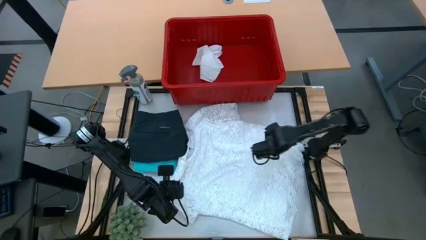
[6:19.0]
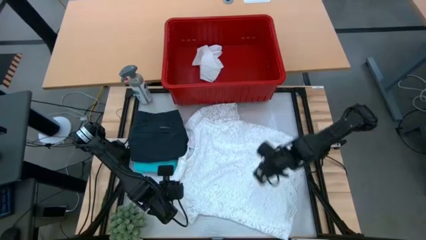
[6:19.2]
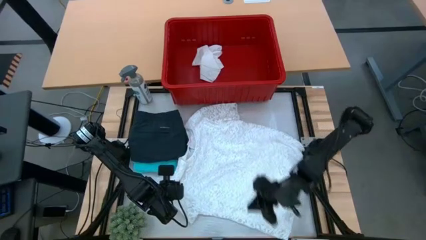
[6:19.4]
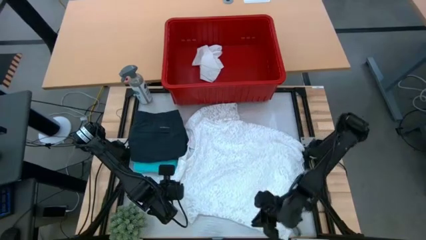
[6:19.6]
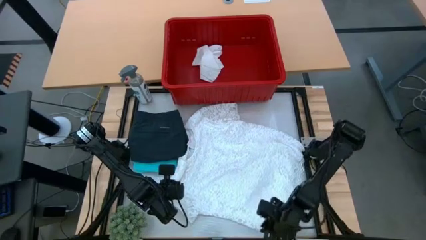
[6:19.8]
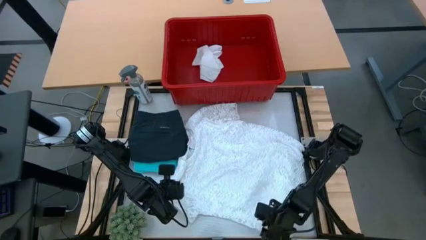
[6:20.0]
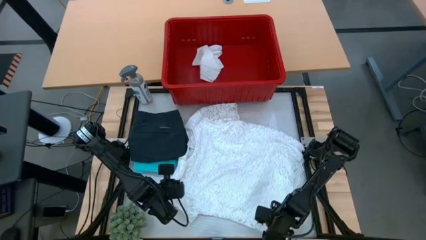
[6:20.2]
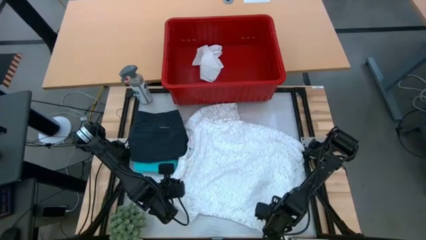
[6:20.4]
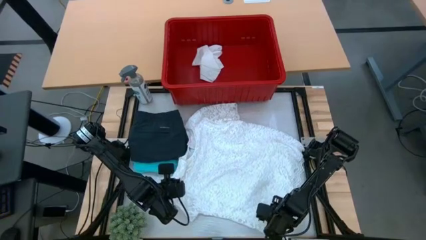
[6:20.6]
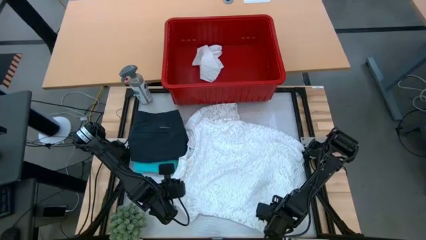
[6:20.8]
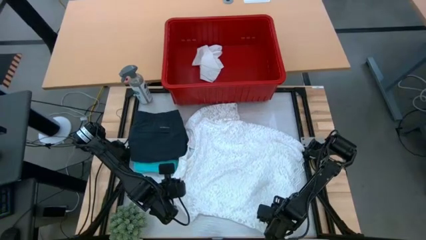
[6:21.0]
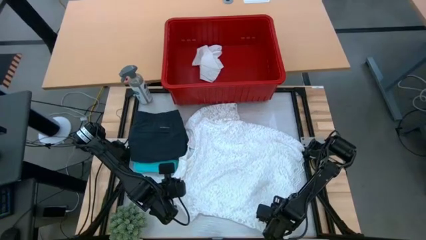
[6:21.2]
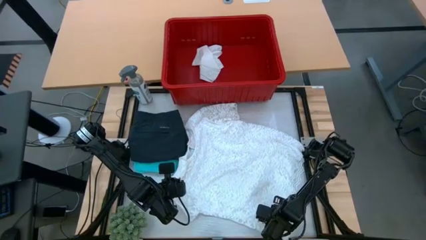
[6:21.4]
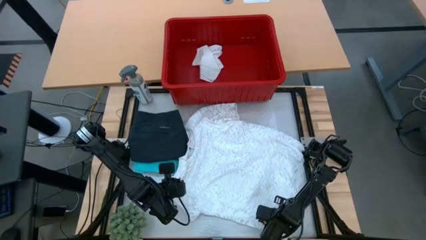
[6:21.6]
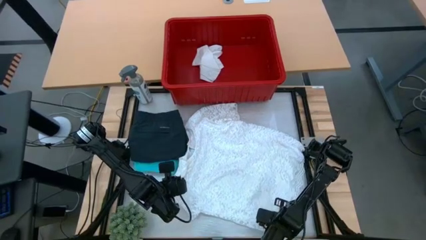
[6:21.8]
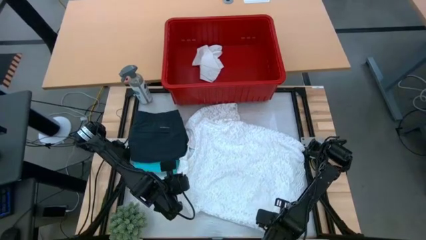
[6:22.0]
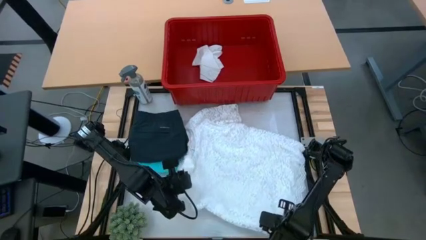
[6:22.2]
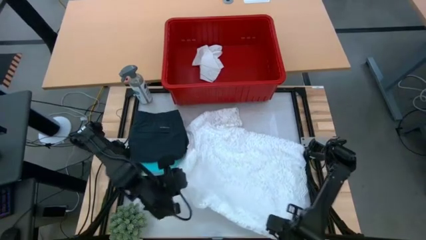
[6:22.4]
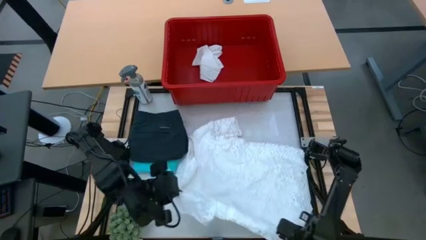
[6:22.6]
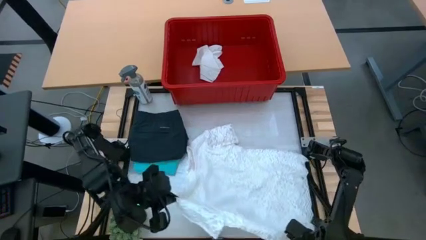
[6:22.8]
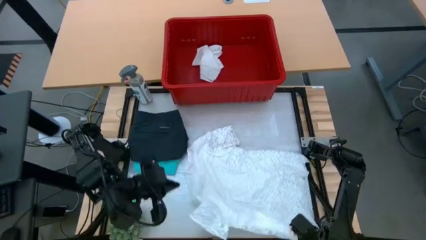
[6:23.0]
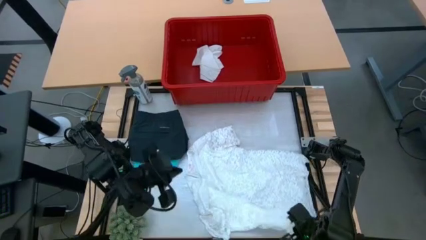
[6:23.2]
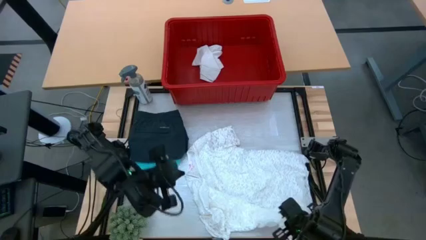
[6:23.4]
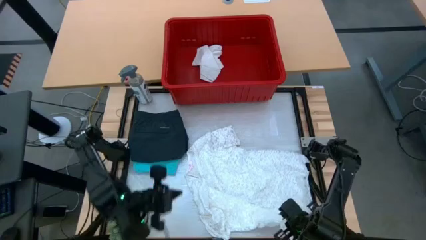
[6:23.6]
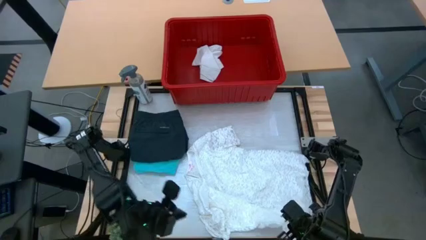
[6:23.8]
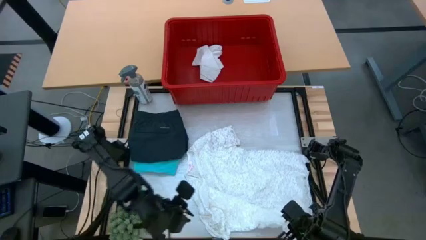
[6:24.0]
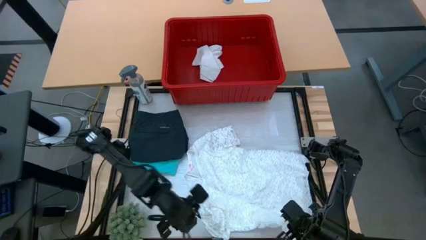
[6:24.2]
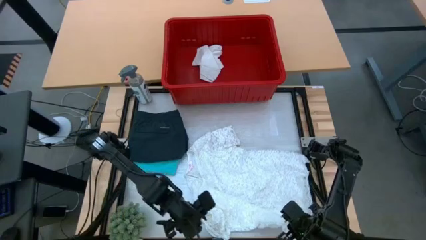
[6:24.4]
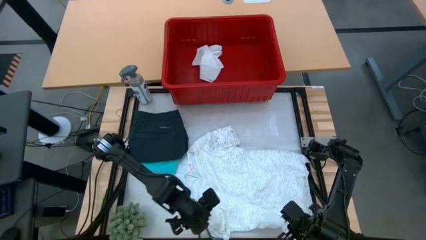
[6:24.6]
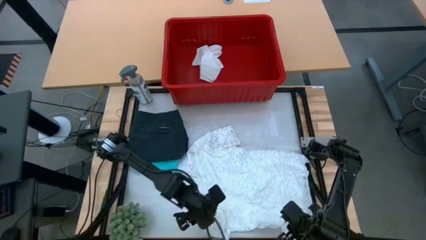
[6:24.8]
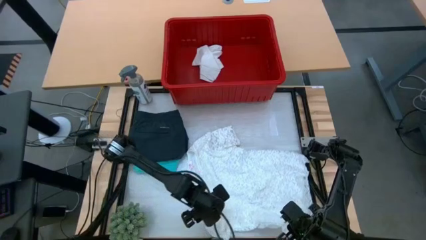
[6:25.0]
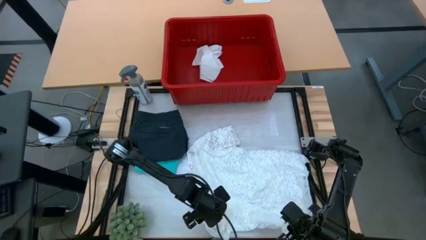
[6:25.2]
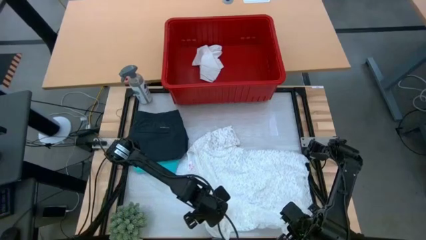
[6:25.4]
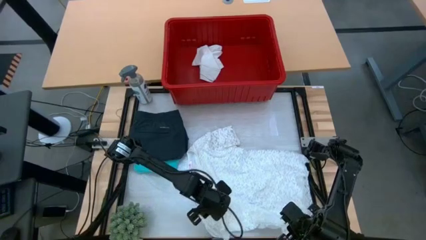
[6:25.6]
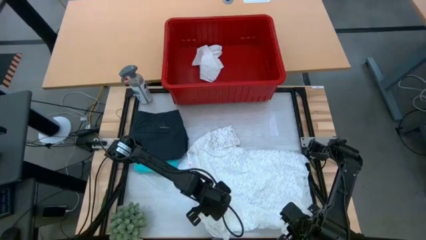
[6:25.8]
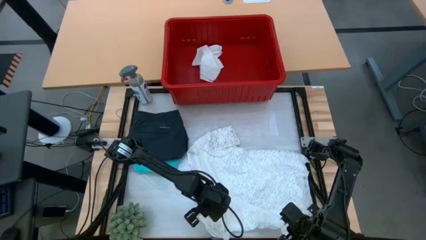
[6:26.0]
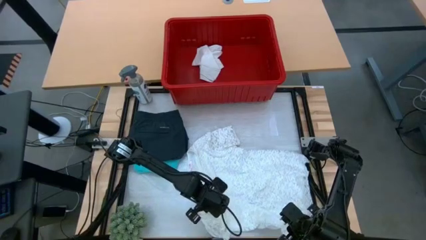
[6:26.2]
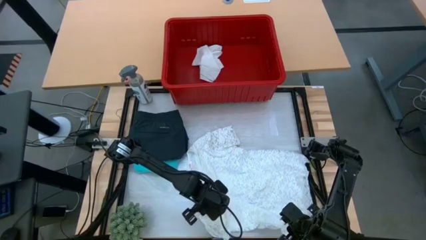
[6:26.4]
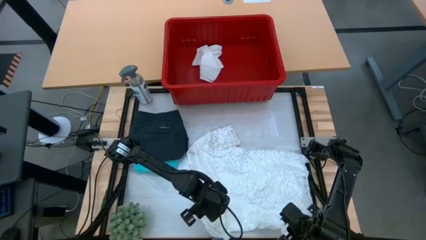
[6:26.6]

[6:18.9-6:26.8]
Task: Fold laundry
Fold the white dress

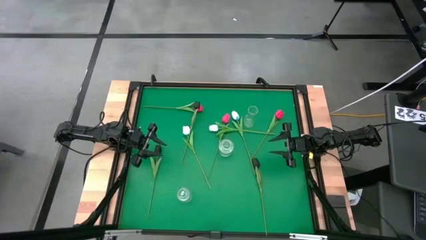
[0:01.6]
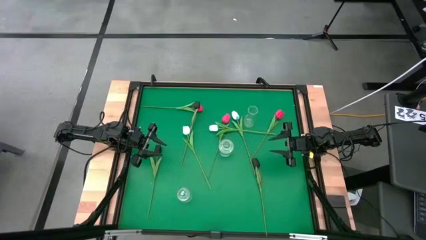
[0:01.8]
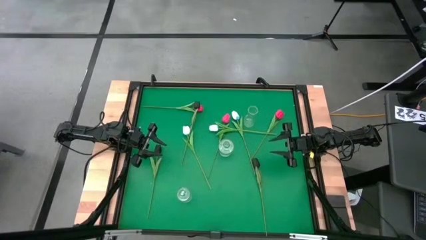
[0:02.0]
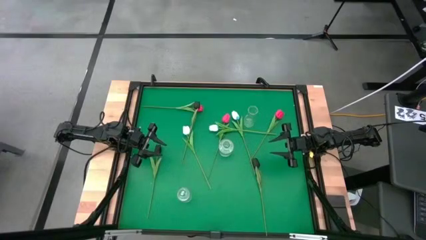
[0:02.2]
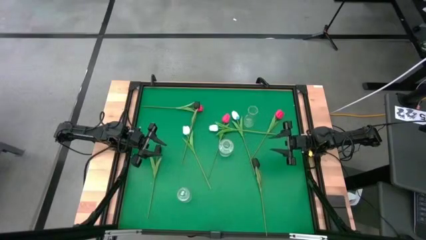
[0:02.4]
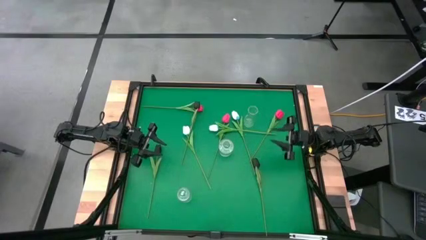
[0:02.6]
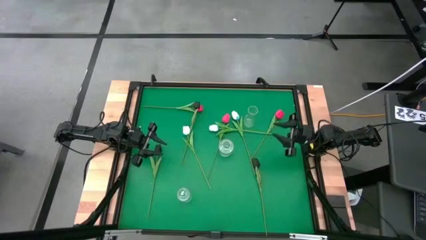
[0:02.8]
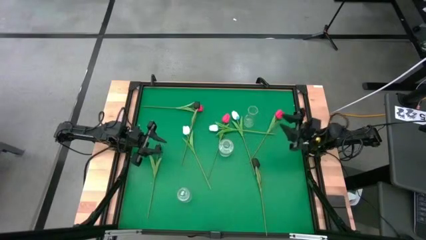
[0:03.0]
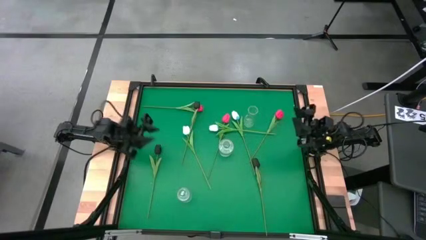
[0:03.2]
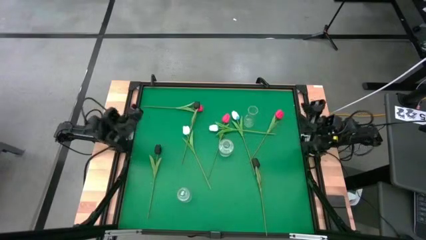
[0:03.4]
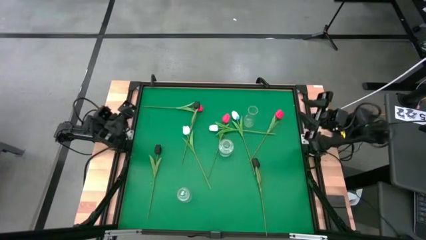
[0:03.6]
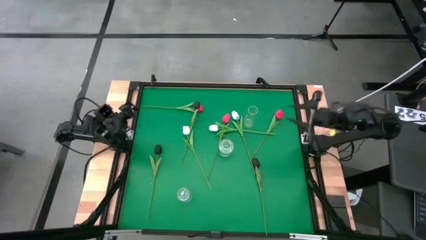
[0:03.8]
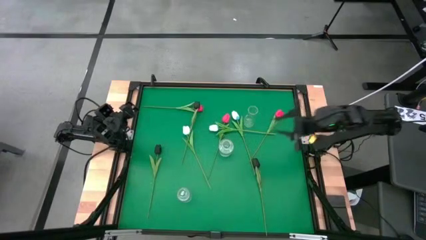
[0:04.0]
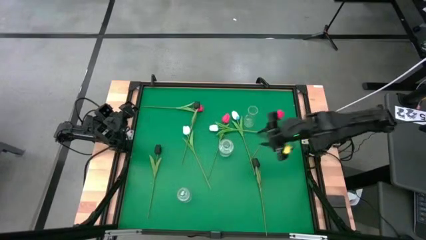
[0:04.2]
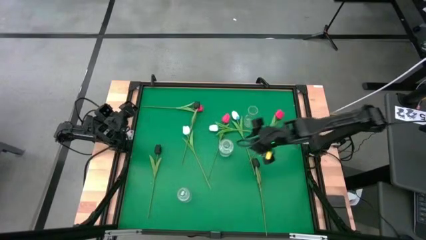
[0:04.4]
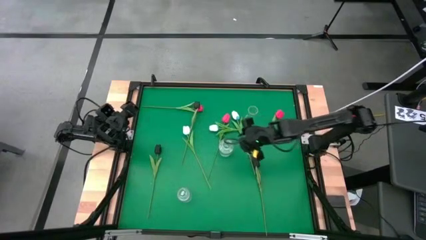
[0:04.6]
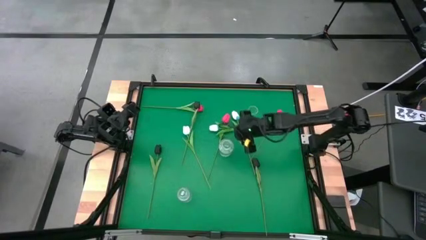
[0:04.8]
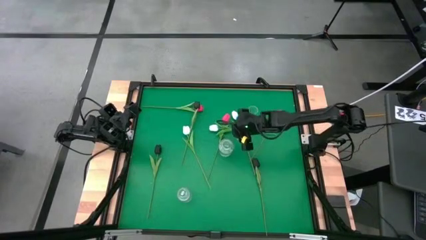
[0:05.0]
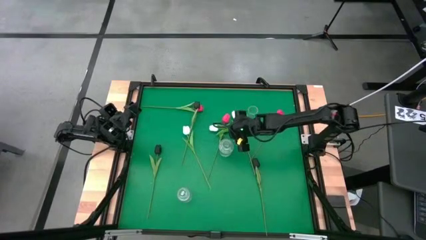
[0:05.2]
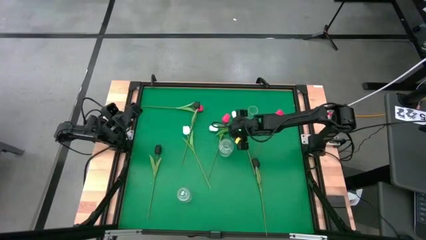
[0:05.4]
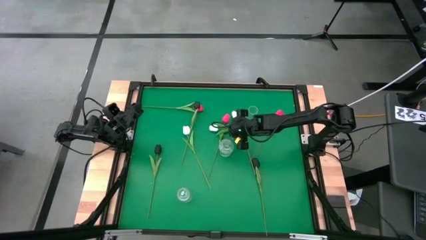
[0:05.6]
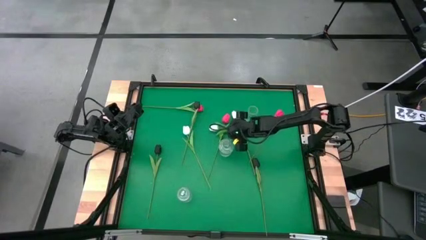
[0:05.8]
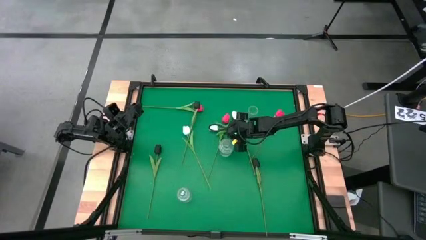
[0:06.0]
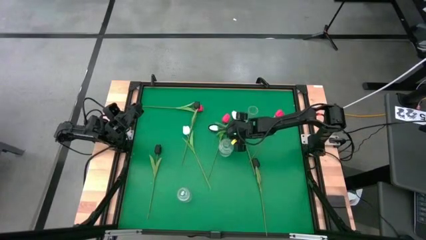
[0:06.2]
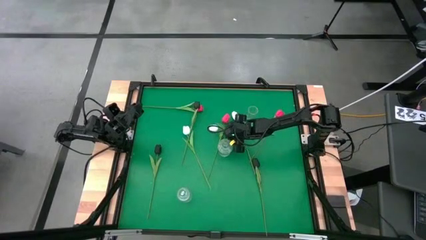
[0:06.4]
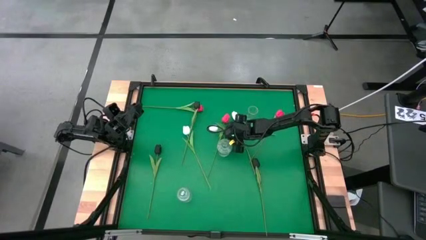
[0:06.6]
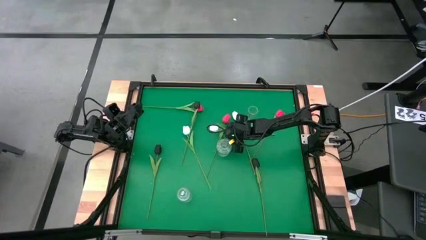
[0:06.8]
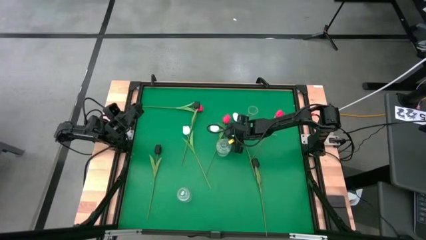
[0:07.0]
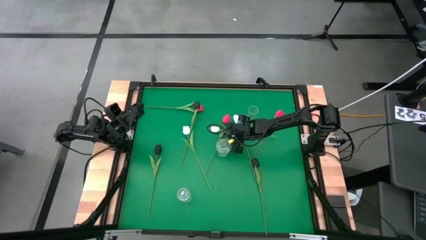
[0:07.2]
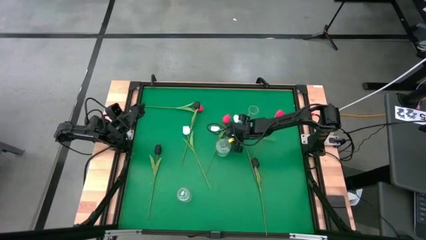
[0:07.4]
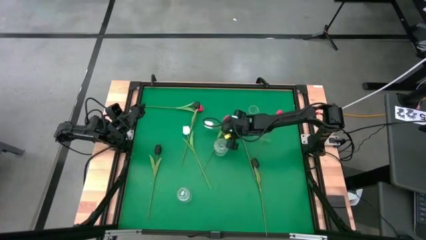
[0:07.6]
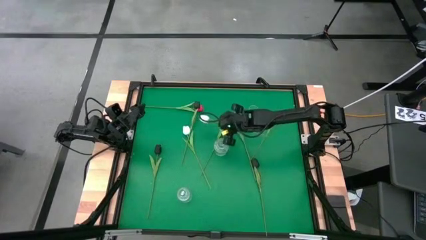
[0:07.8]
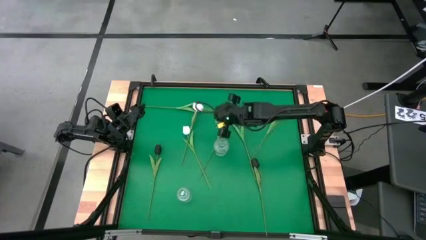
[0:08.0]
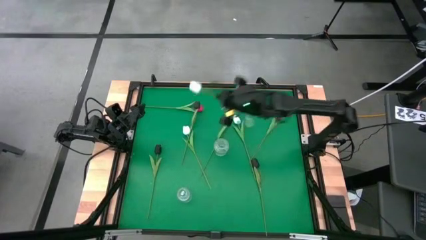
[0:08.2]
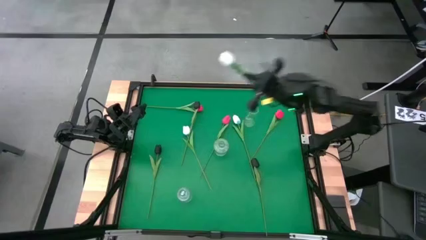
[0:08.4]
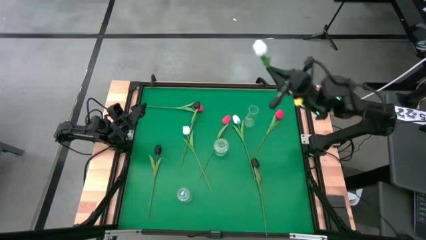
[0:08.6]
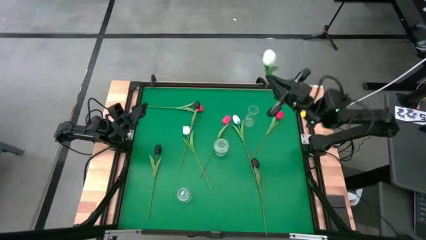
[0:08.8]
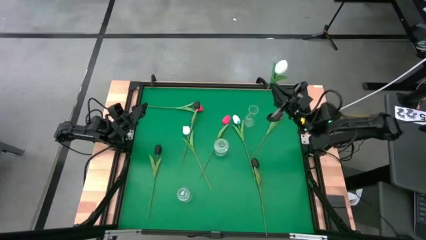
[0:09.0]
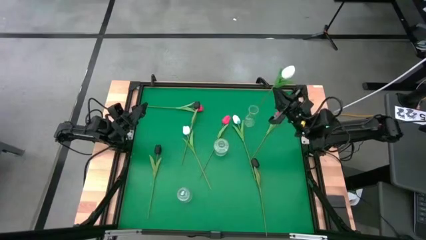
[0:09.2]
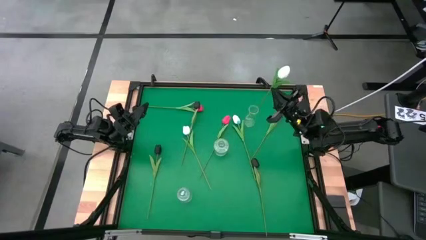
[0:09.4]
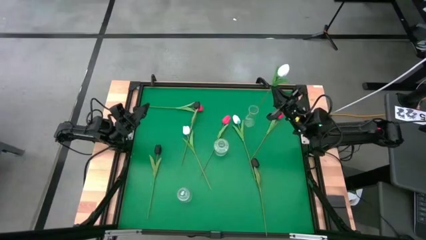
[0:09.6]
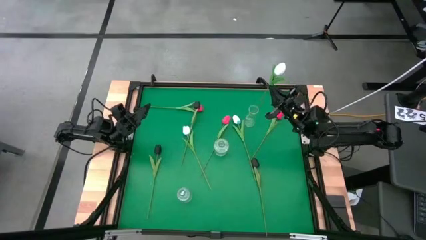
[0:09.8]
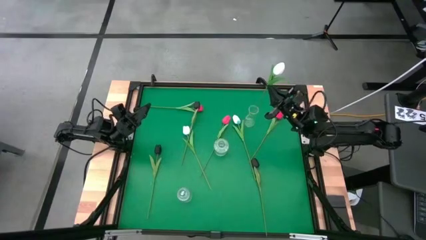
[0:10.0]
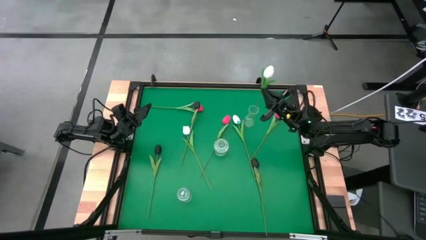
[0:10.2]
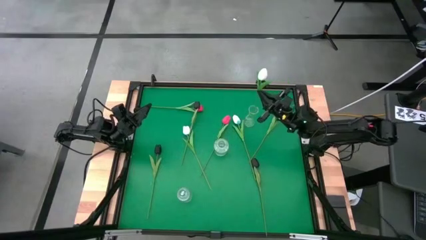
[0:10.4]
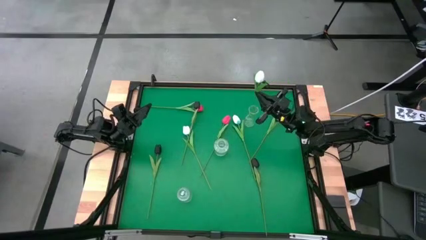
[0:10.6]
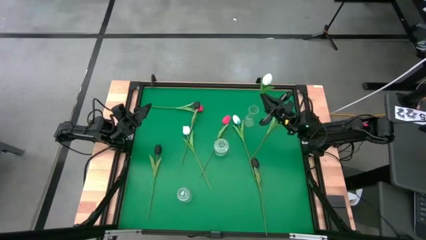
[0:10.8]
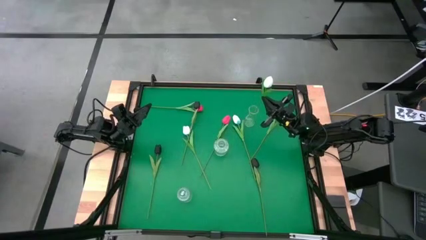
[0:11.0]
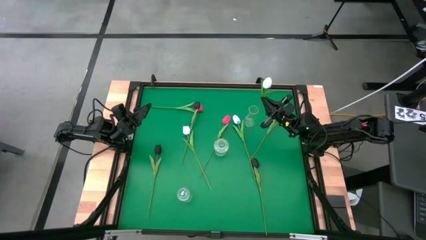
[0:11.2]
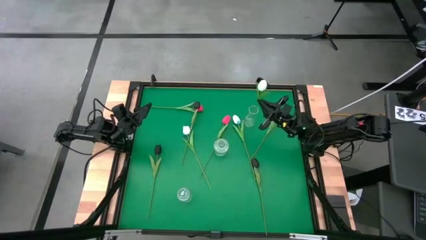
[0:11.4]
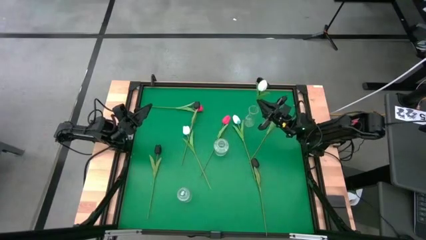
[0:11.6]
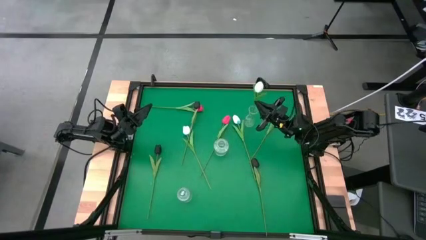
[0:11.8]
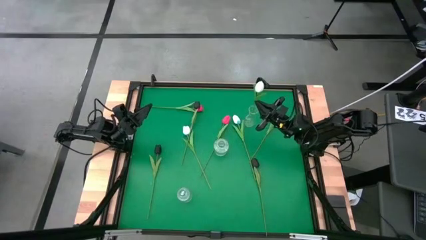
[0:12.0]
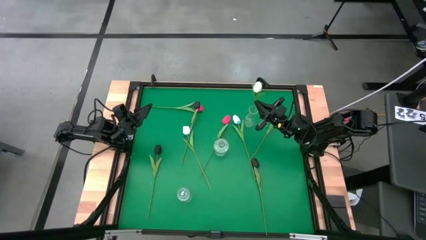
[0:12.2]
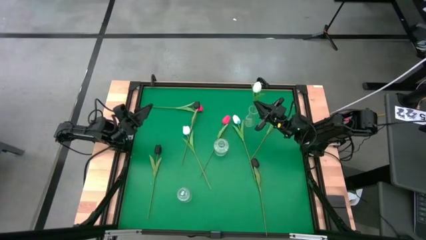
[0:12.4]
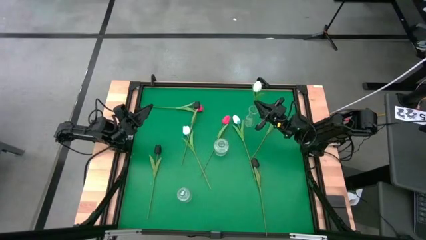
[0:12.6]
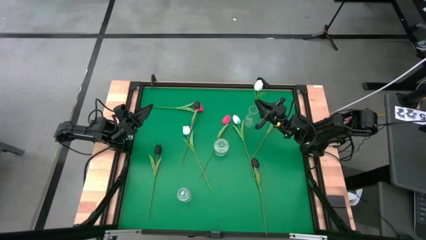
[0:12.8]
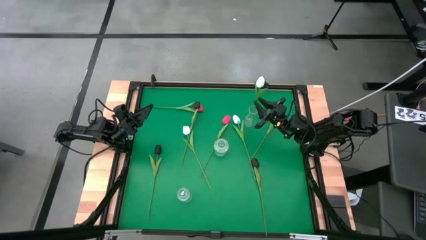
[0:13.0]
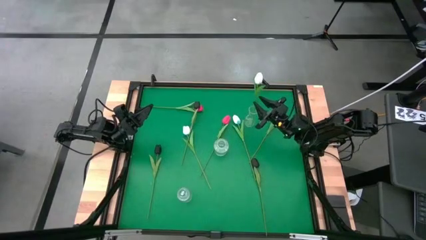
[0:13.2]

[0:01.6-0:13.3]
Task: Sort flowers into vase by color
Put the middle white tulip into the top transparent flower vase
